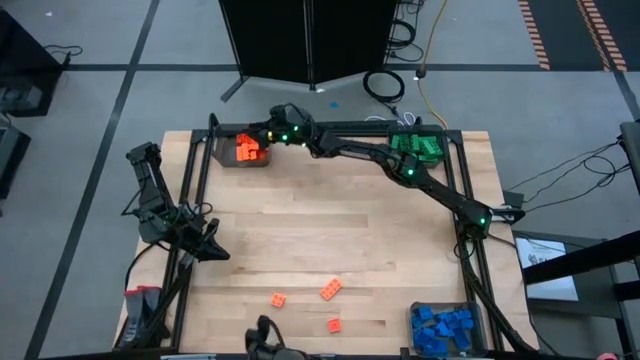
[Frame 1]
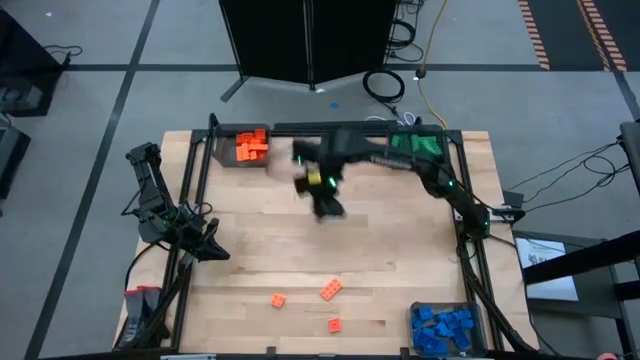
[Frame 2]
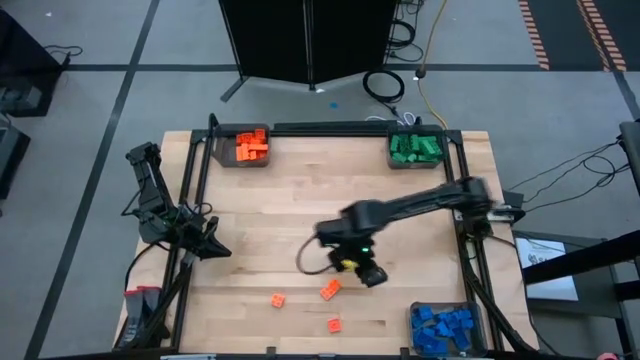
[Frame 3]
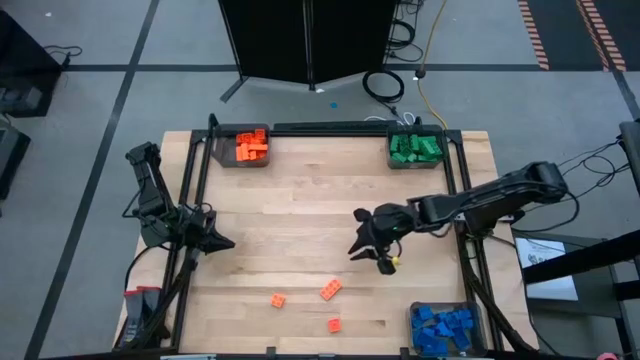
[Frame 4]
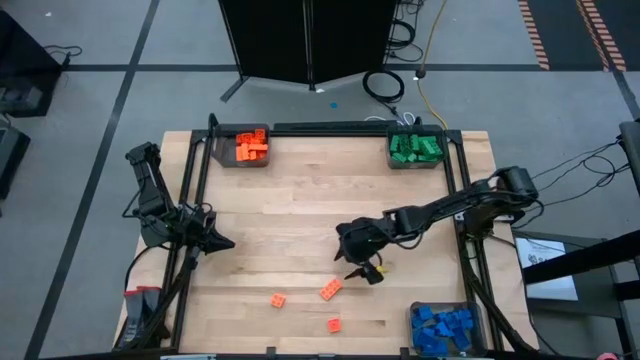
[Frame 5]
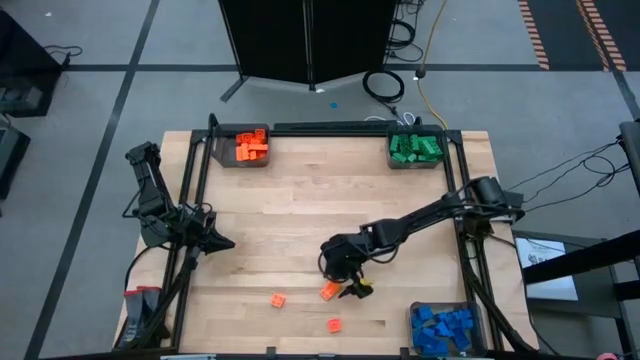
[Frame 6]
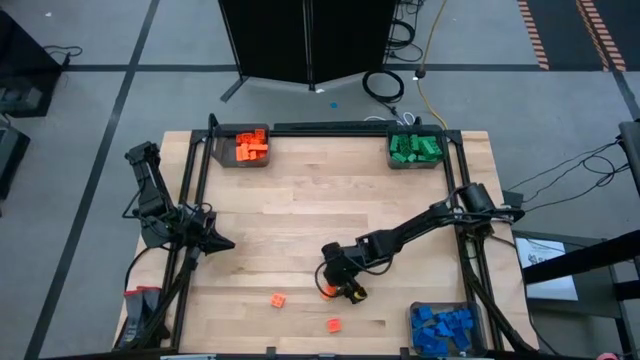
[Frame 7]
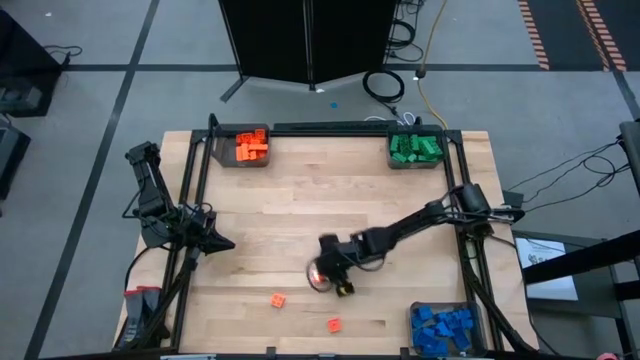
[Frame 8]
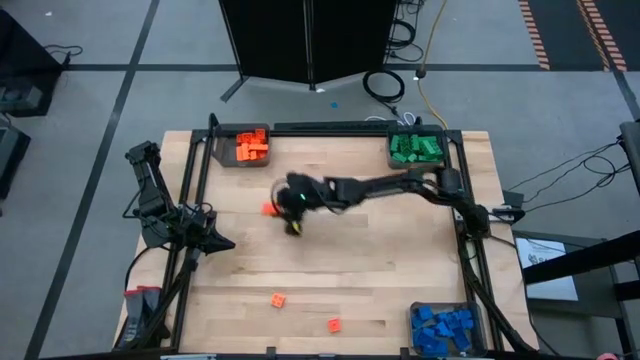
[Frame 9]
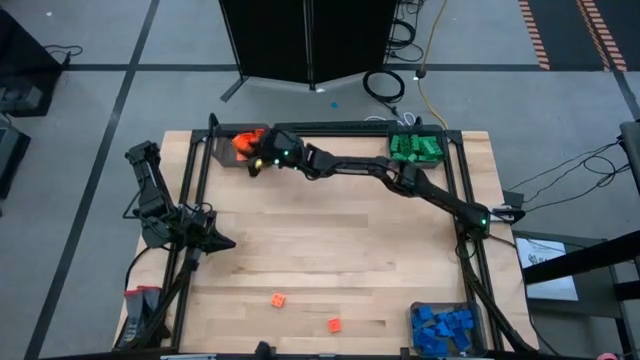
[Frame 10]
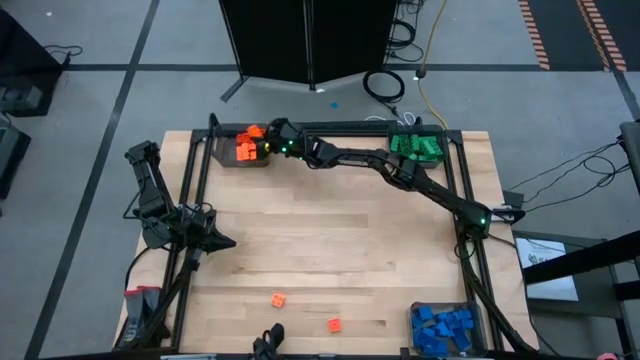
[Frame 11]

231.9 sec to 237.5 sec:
Task: Sort blocks
Put the orange game piece into the top left black bin

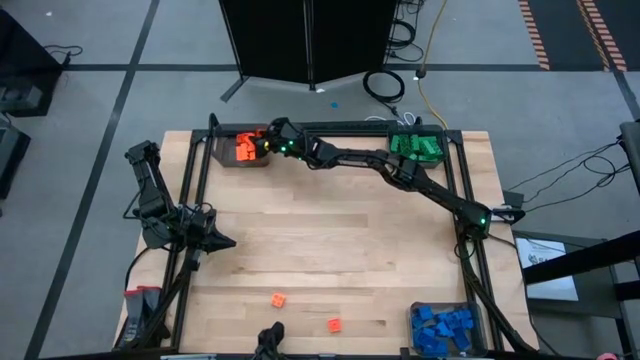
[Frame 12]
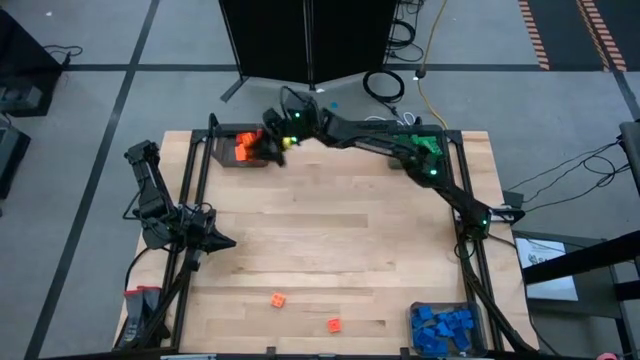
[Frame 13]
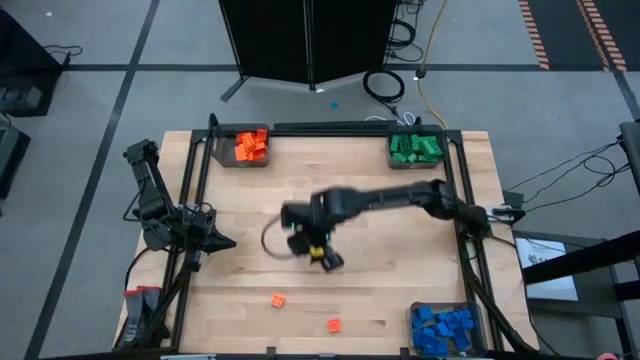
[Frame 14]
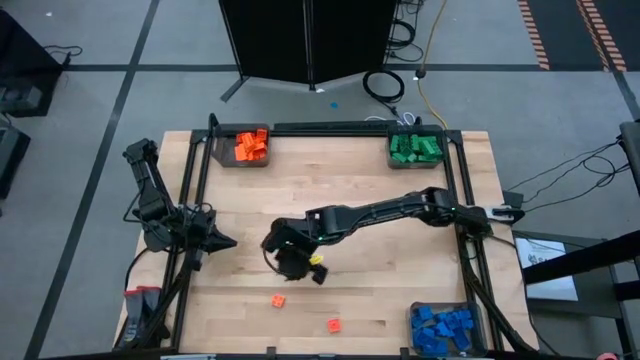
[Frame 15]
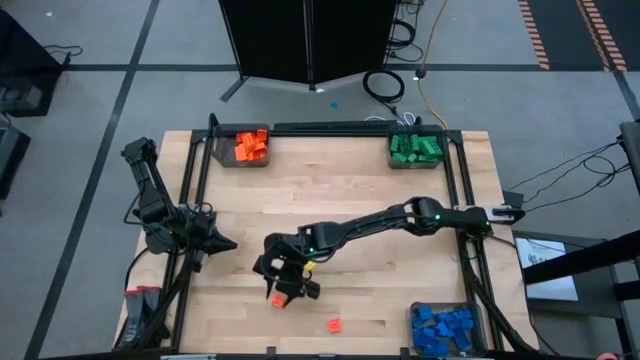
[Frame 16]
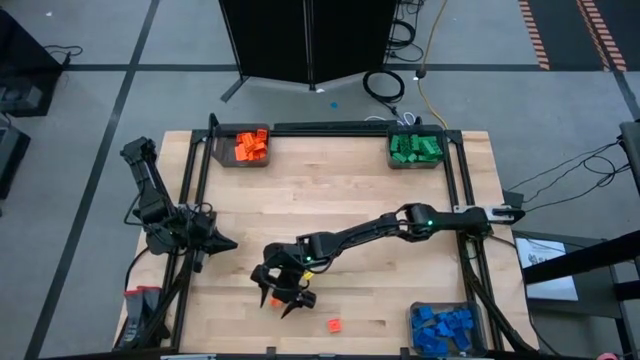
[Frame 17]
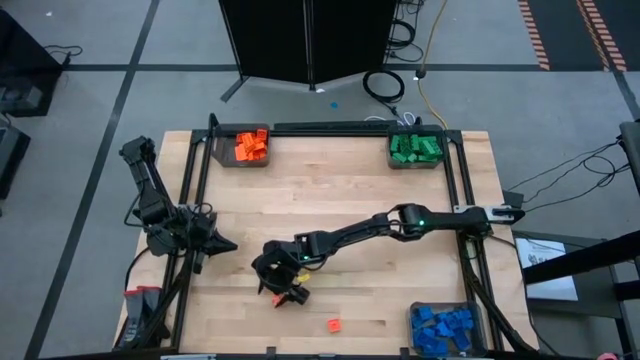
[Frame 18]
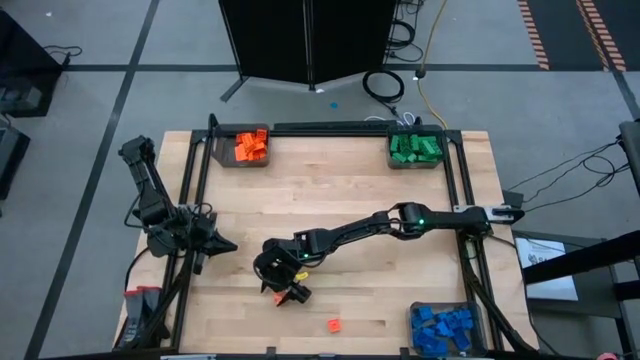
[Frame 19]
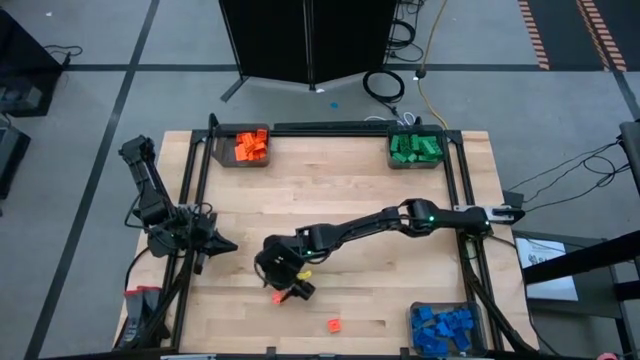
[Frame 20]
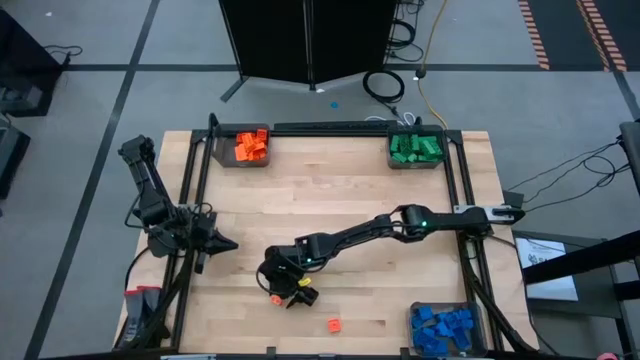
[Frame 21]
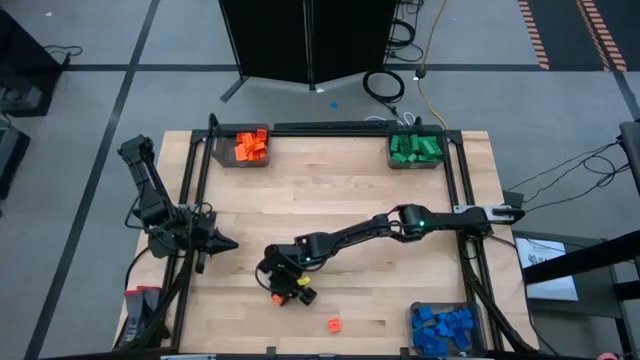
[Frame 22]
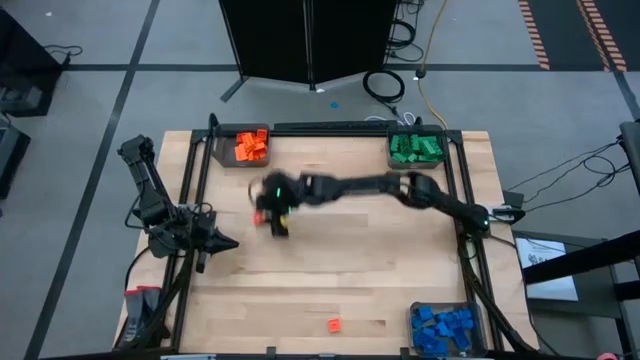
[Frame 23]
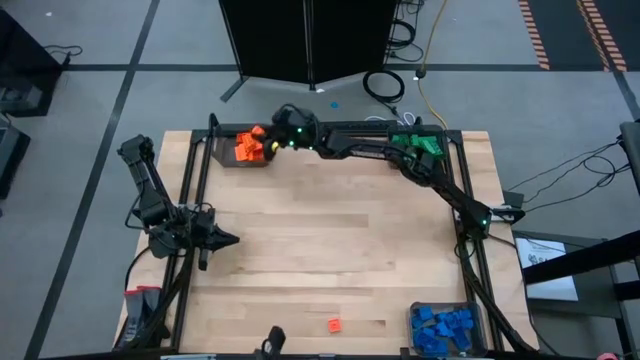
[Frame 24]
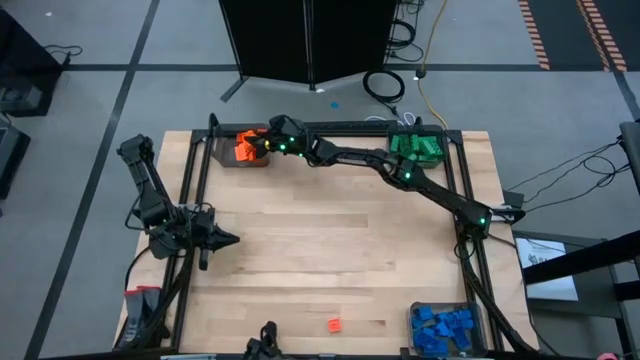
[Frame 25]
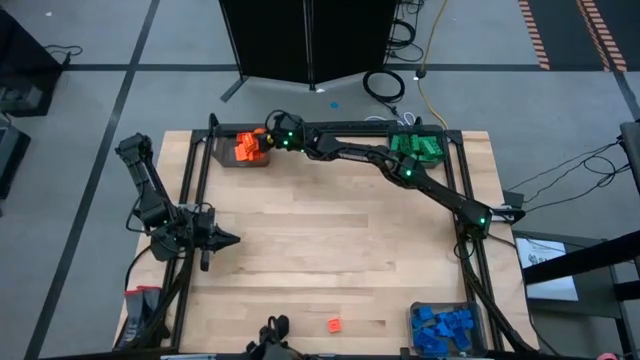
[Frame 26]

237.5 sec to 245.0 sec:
Put the orange game piece into the top left black bin

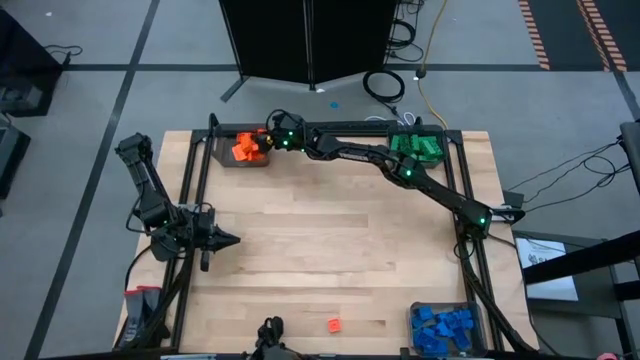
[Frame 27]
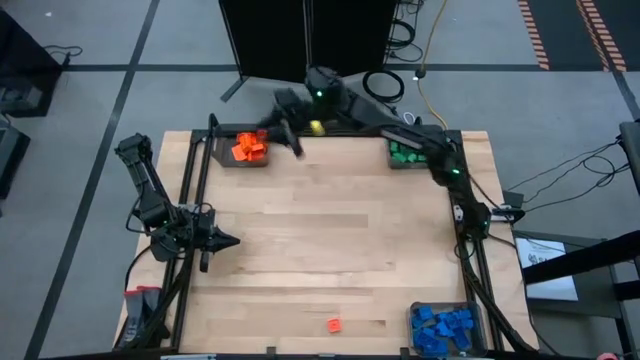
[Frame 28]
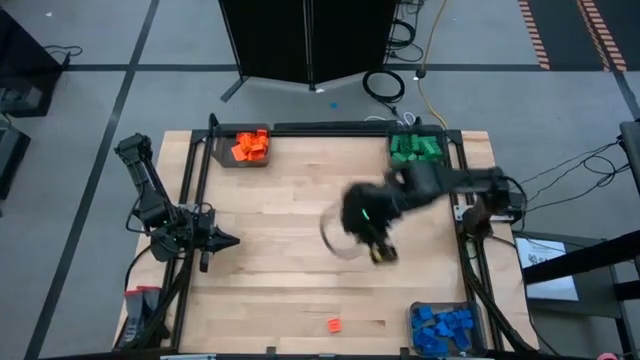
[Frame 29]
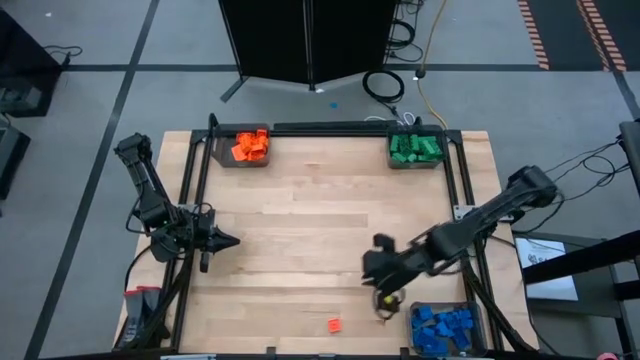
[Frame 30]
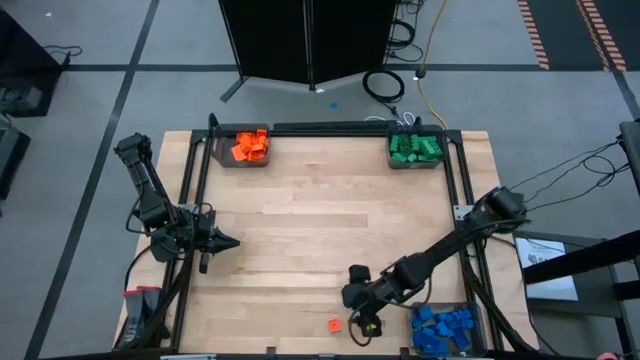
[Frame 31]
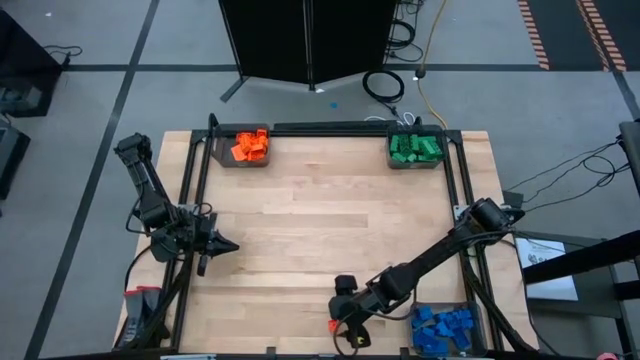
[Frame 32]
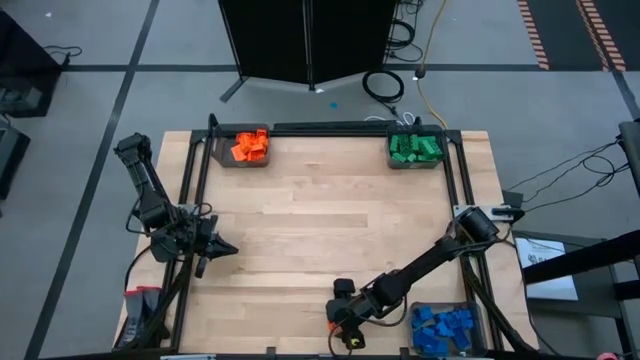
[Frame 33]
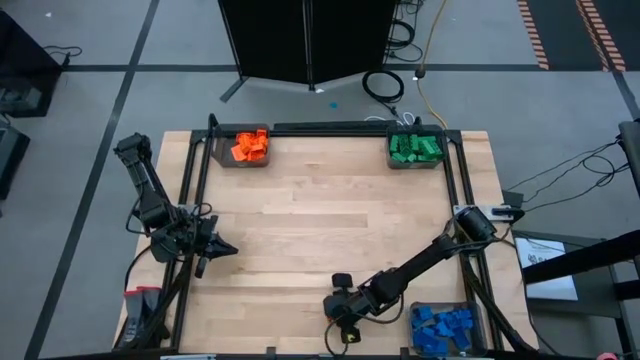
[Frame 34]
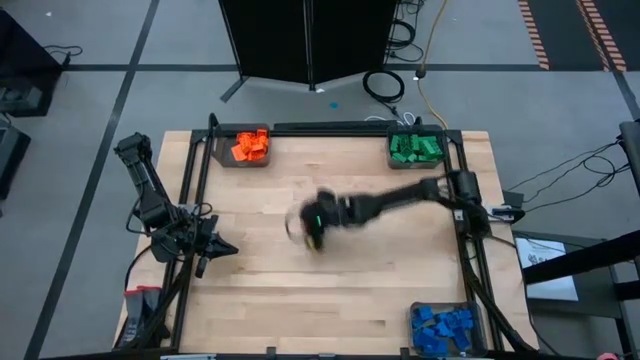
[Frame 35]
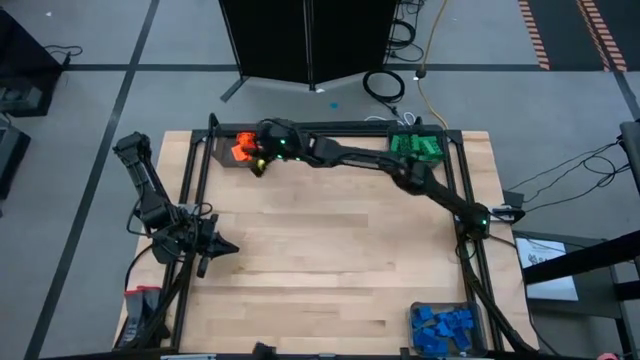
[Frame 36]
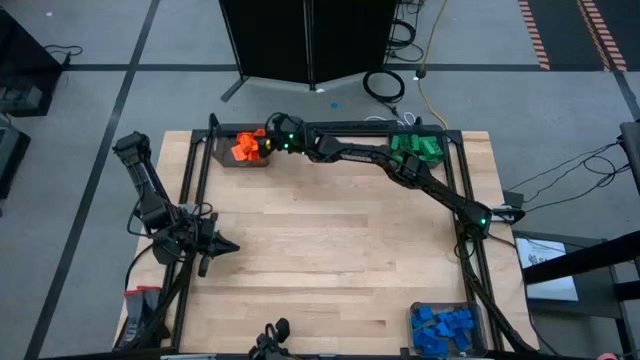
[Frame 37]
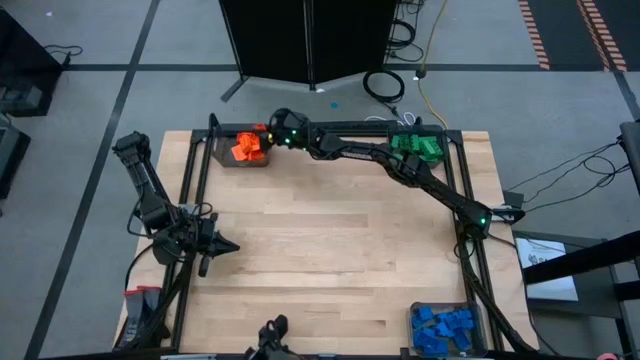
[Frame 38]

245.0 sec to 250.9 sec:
Put the orange game piece into the top left black bin

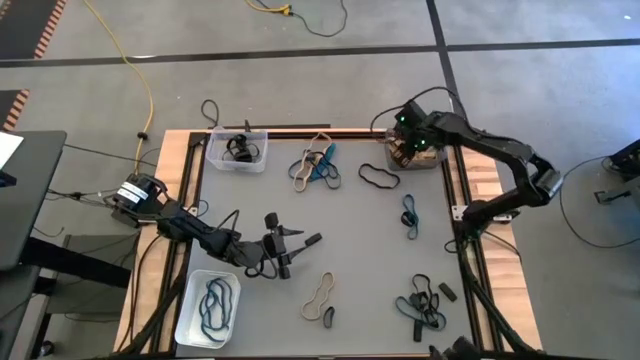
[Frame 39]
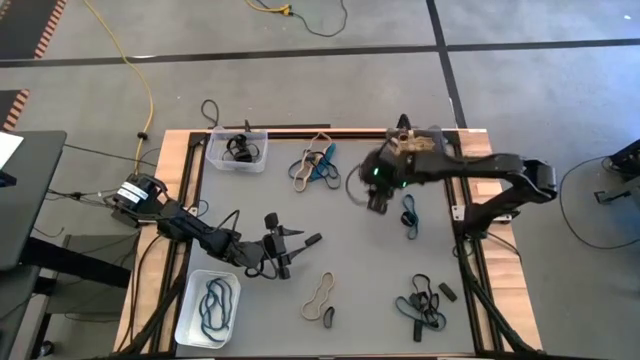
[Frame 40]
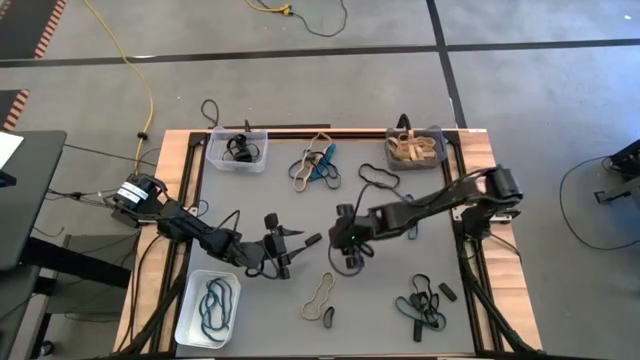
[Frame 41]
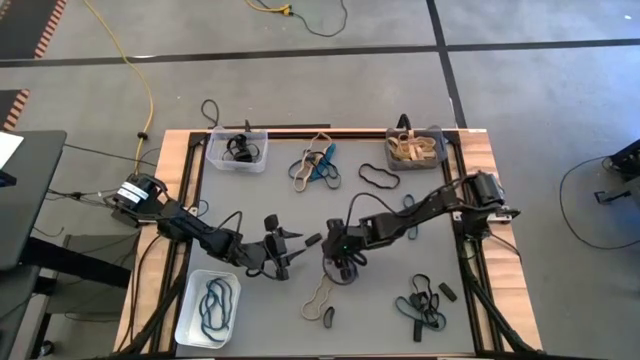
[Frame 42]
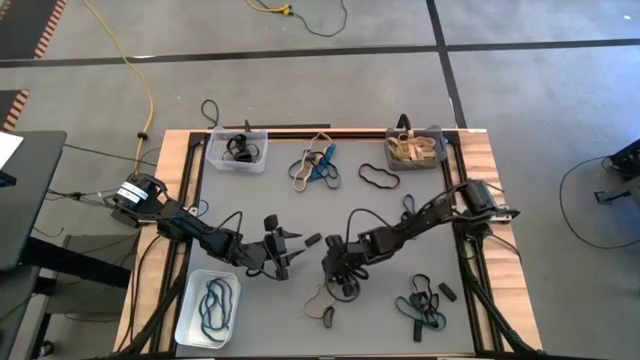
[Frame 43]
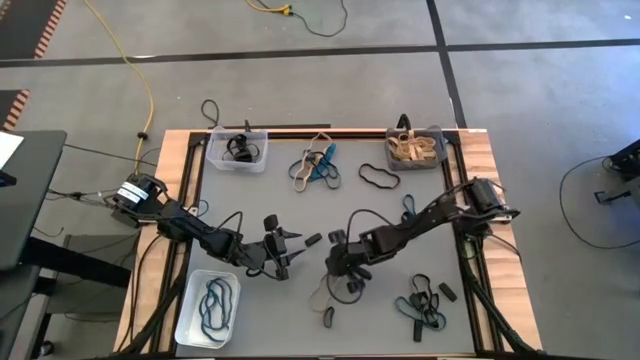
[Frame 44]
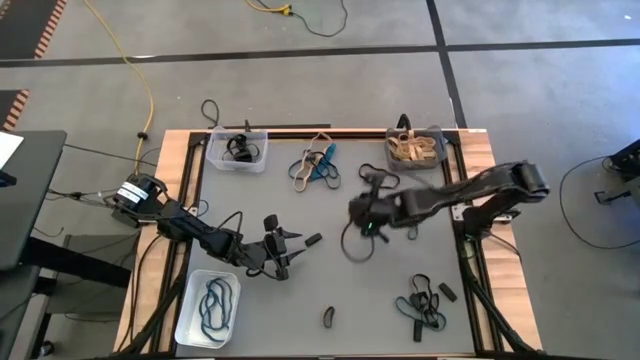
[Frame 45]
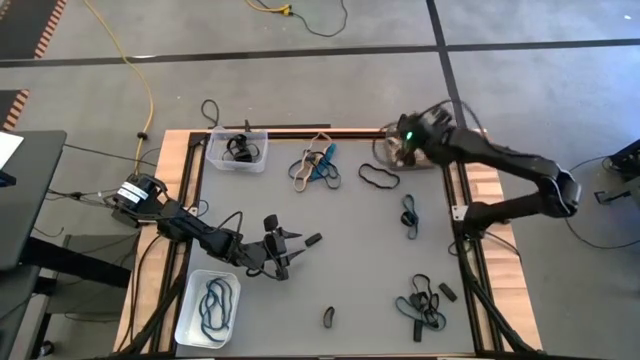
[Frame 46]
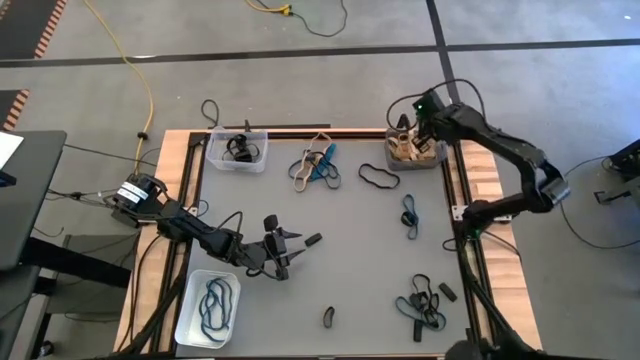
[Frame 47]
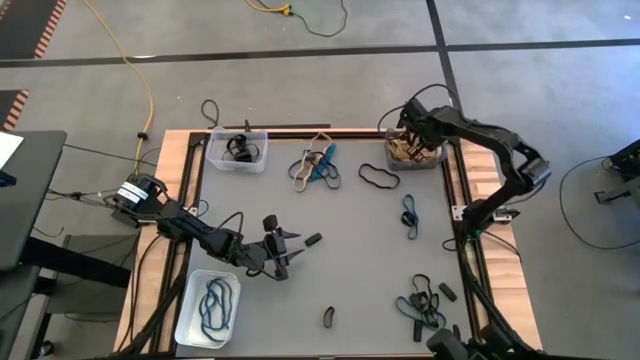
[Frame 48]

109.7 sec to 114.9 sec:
Task: Sort rubber bands into baskets
Put the white rubber band into the black transparent bin
